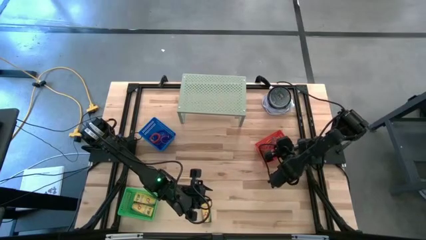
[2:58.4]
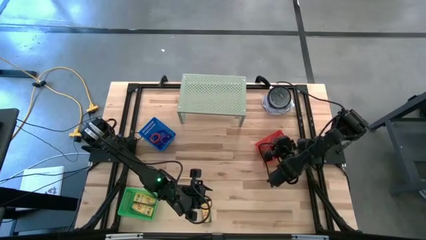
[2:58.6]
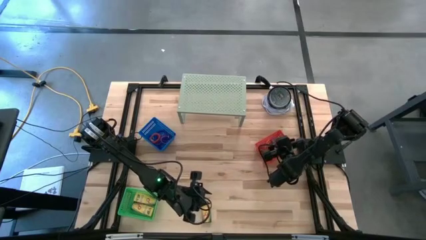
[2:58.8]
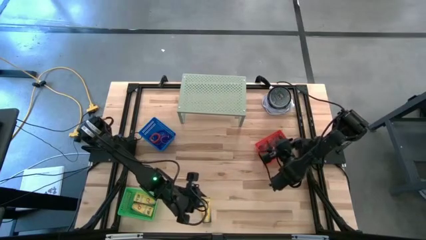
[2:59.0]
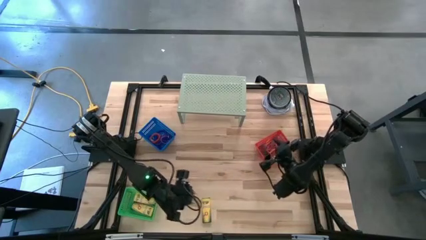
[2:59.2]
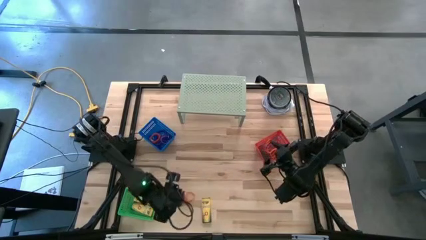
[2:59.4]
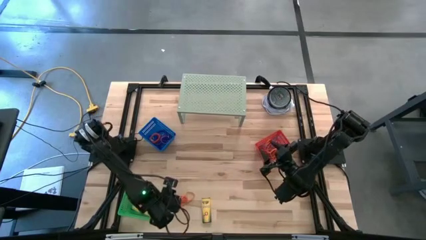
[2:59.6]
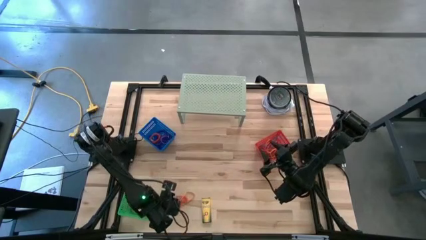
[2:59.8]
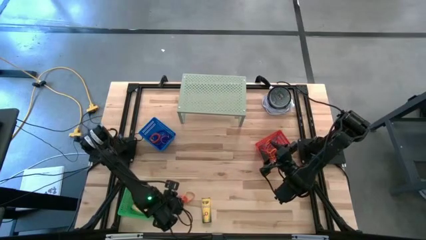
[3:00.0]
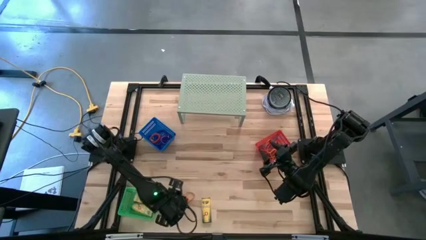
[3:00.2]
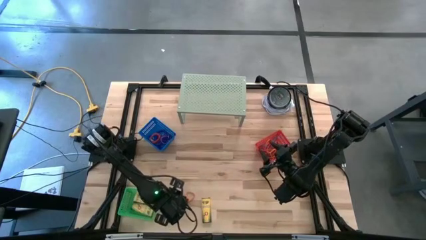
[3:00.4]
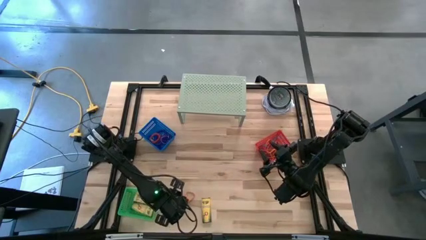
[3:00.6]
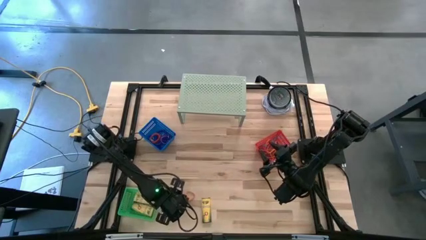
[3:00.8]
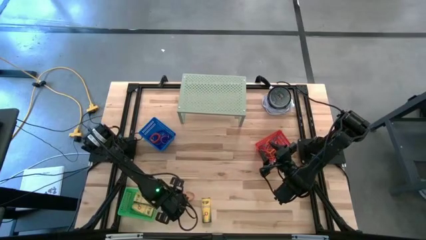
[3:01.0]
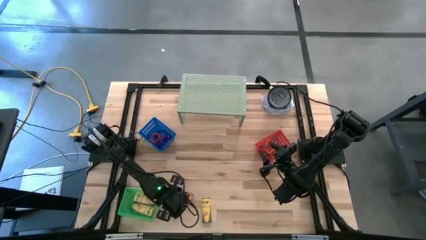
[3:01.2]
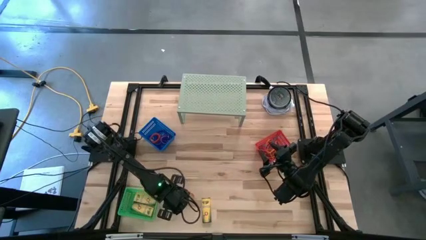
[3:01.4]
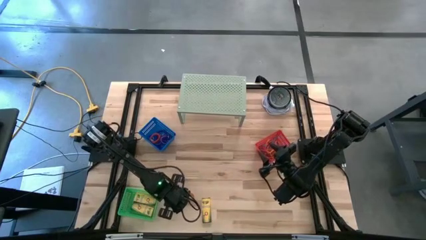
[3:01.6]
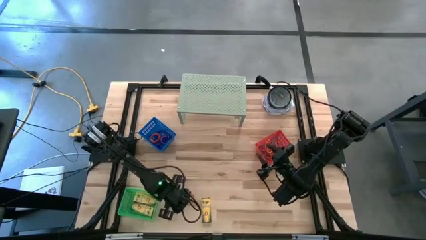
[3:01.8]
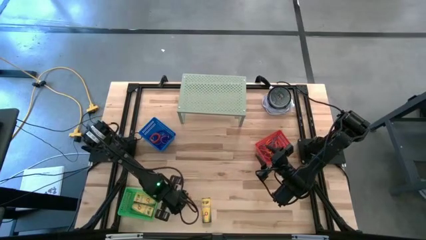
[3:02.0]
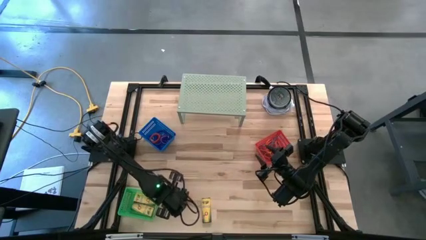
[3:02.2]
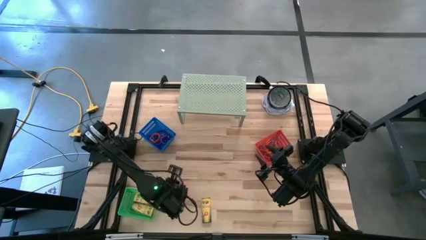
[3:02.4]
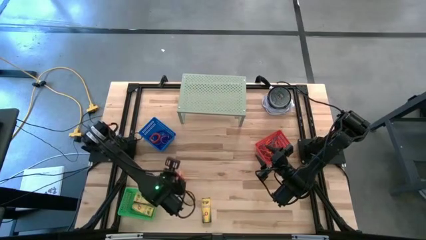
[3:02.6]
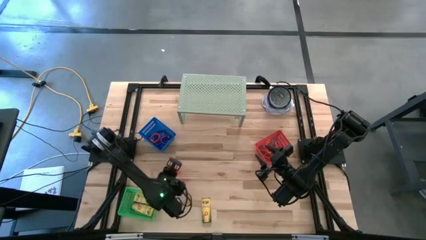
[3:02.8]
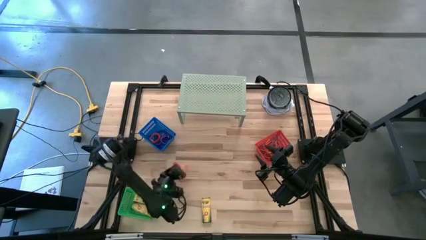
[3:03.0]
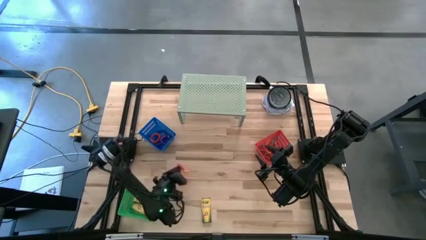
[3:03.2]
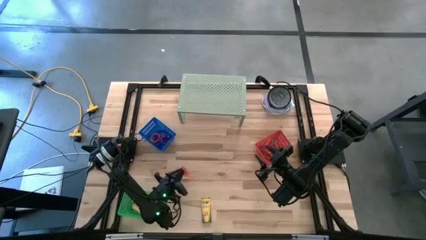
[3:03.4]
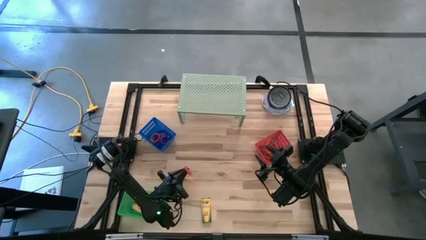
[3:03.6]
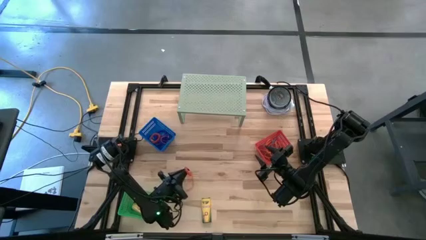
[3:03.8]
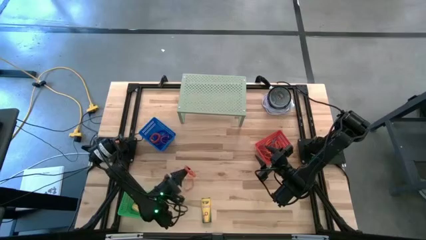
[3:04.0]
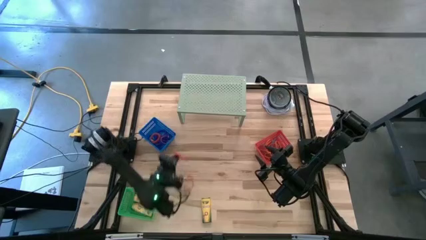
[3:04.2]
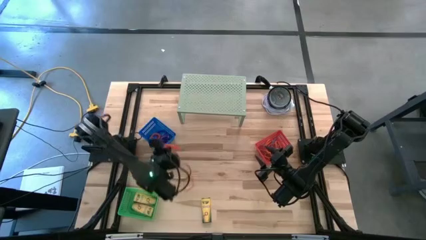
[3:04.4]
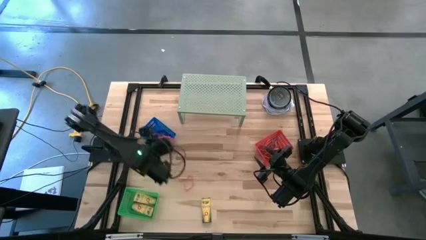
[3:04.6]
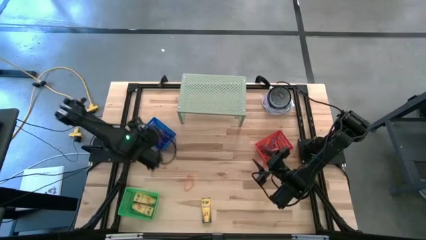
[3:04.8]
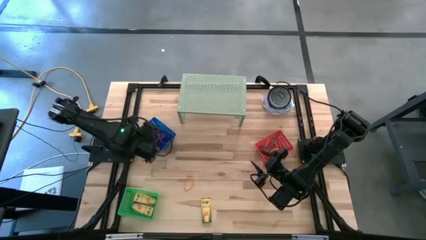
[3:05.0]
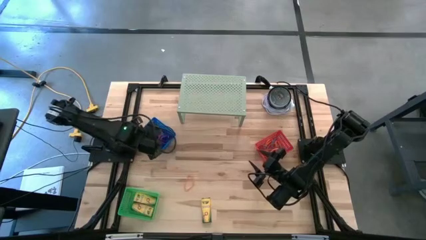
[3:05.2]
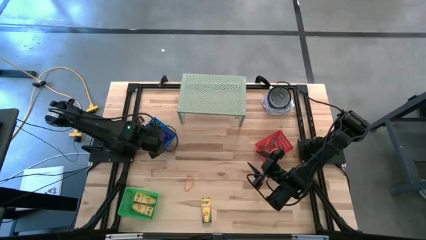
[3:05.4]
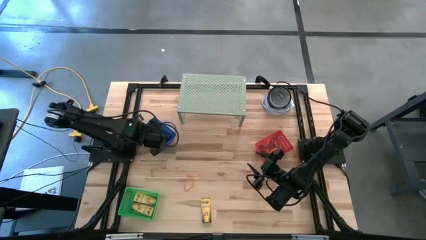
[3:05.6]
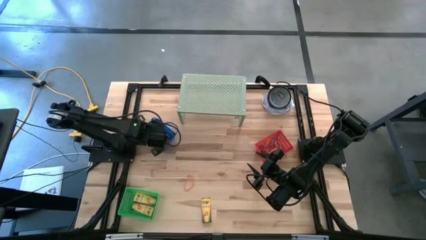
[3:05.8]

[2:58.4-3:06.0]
Task: Pick & Place Office Desk Supplies
Put the orange spring keychain into the blue bin

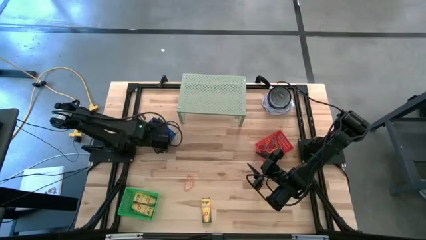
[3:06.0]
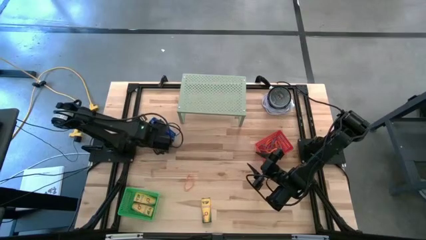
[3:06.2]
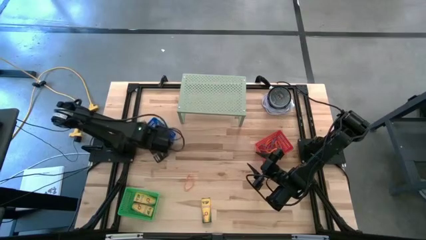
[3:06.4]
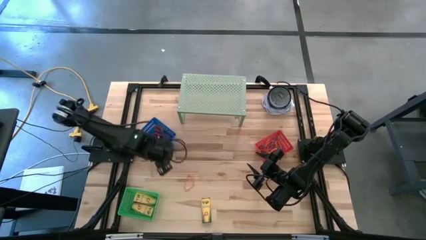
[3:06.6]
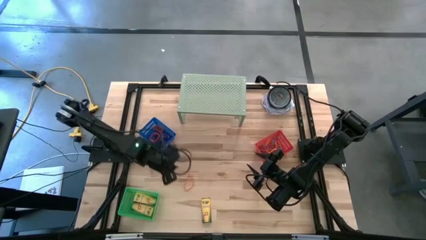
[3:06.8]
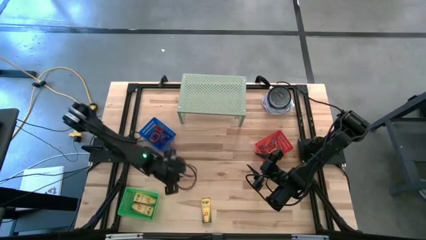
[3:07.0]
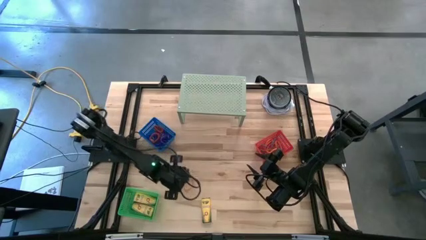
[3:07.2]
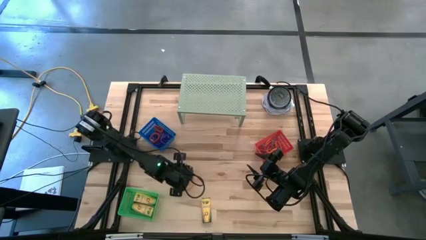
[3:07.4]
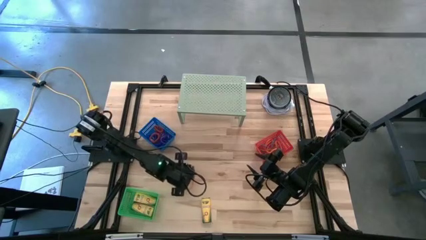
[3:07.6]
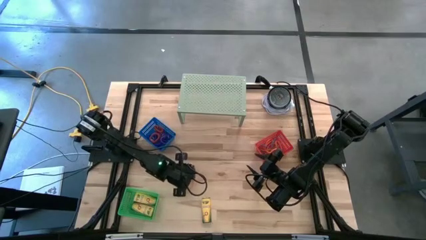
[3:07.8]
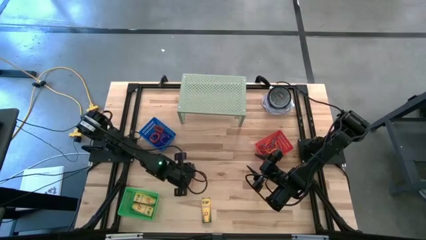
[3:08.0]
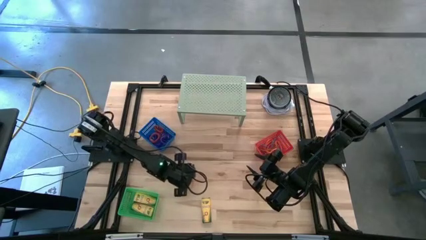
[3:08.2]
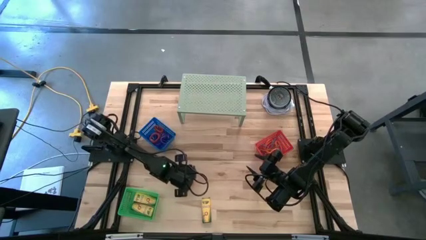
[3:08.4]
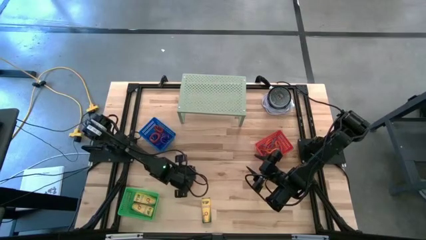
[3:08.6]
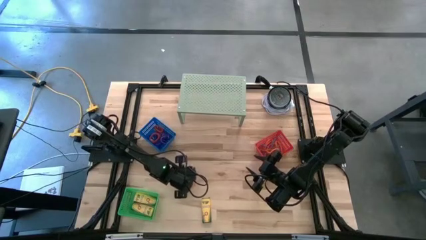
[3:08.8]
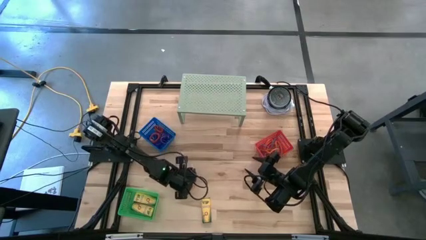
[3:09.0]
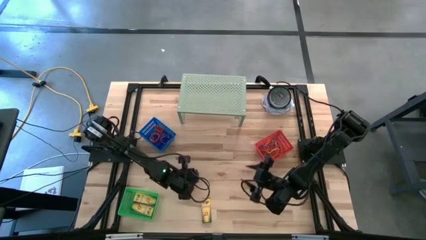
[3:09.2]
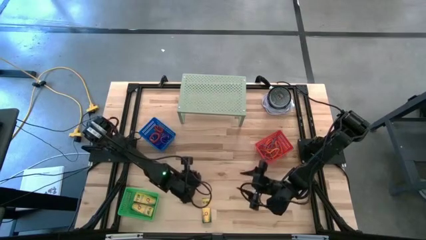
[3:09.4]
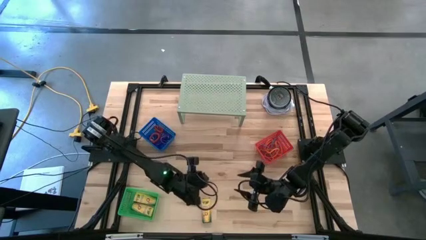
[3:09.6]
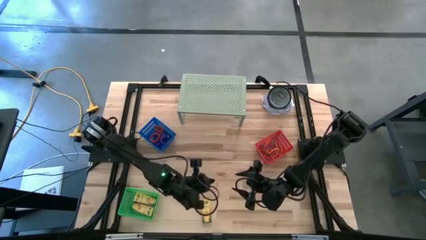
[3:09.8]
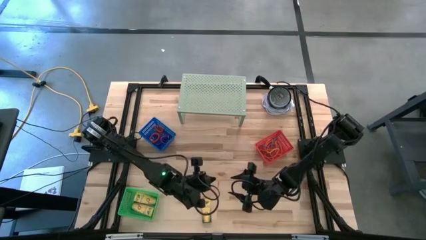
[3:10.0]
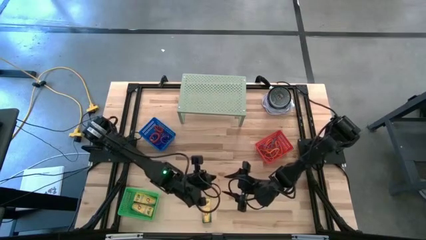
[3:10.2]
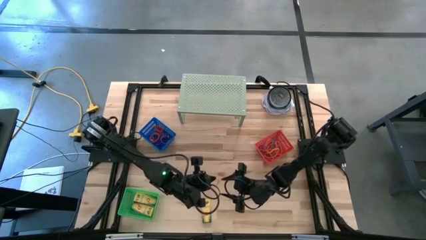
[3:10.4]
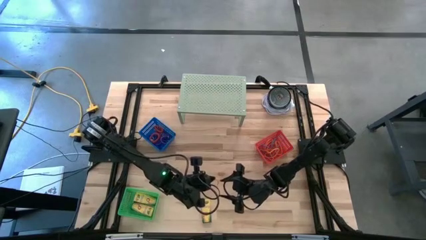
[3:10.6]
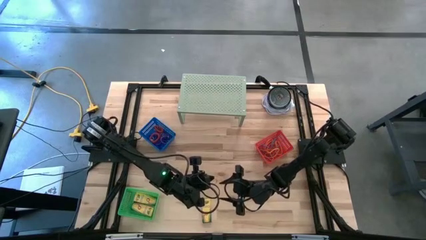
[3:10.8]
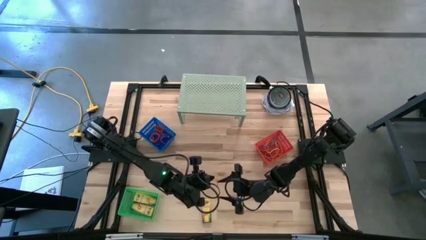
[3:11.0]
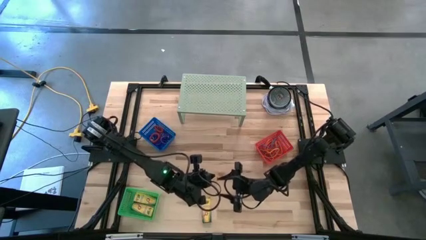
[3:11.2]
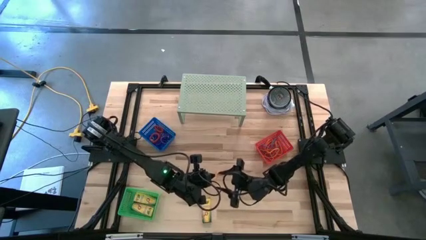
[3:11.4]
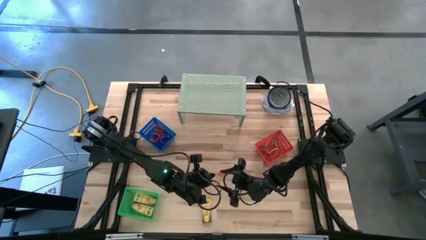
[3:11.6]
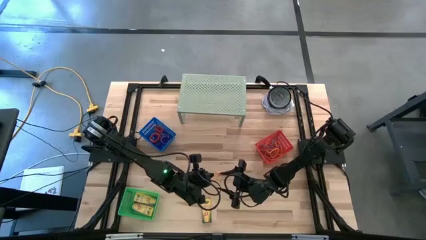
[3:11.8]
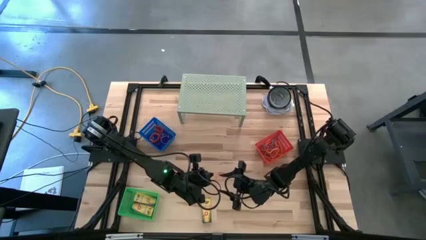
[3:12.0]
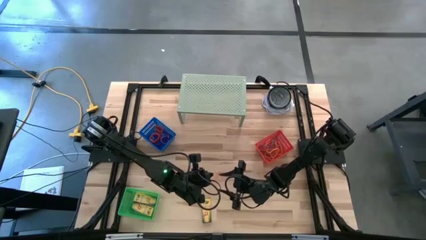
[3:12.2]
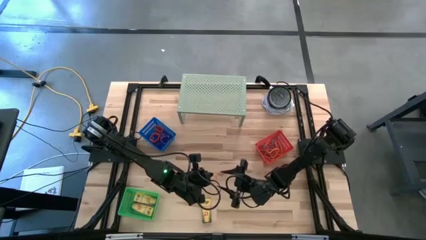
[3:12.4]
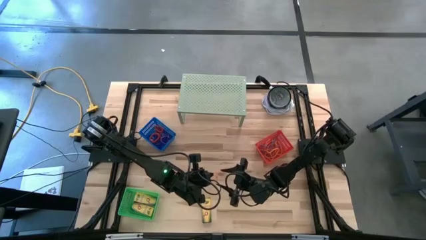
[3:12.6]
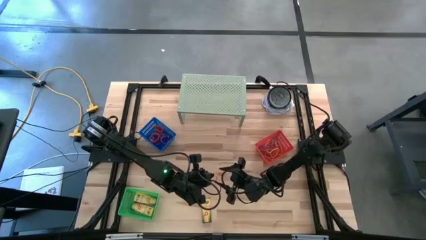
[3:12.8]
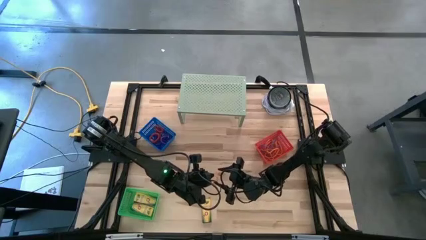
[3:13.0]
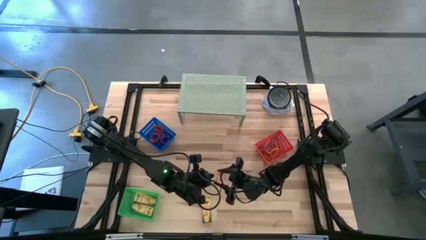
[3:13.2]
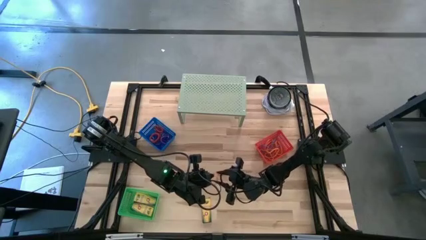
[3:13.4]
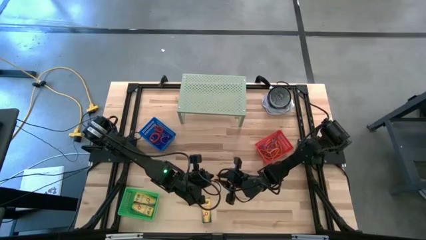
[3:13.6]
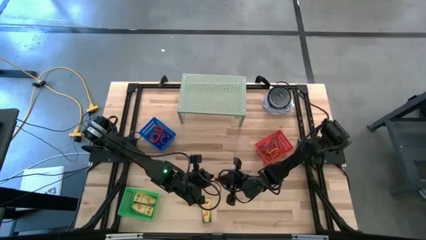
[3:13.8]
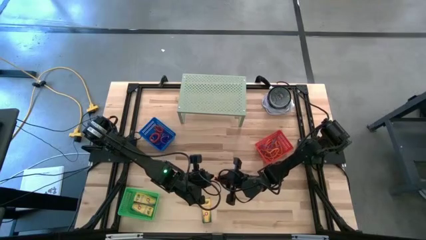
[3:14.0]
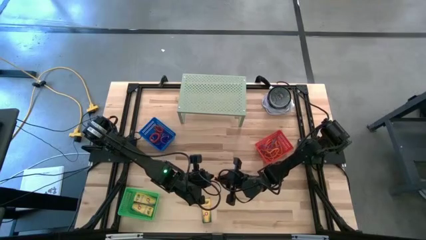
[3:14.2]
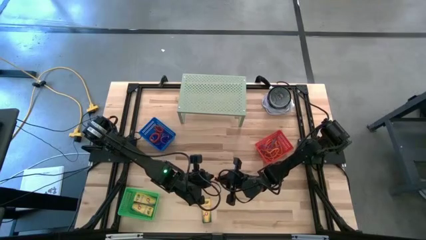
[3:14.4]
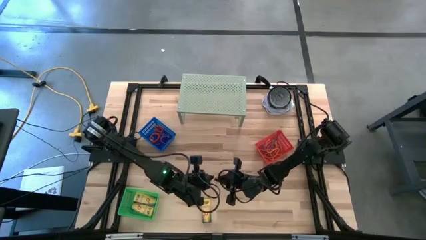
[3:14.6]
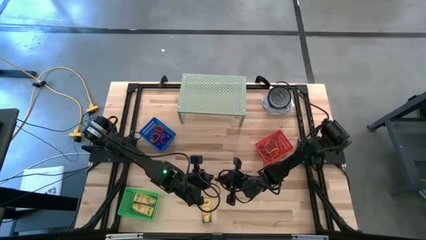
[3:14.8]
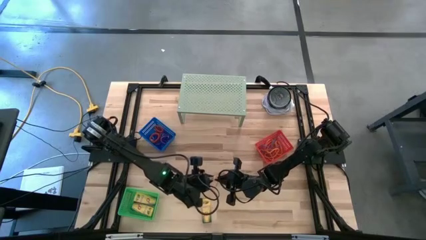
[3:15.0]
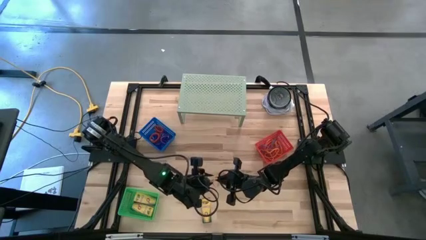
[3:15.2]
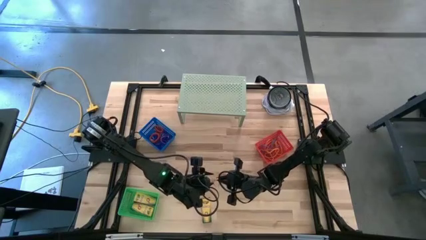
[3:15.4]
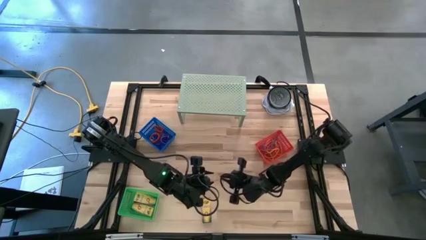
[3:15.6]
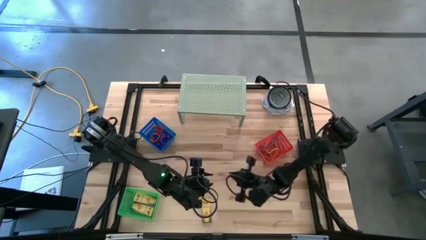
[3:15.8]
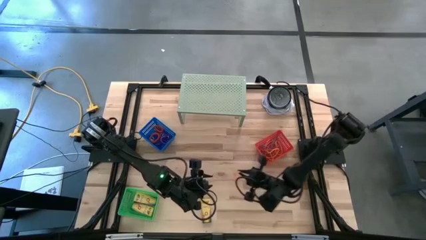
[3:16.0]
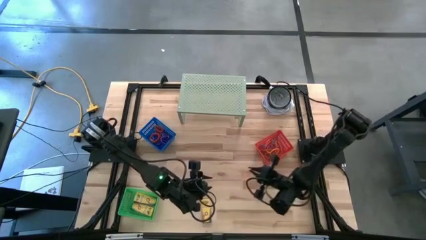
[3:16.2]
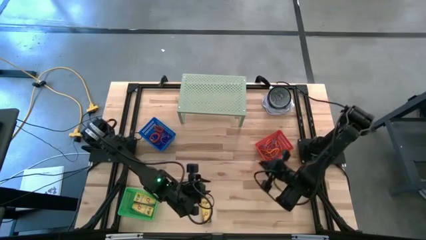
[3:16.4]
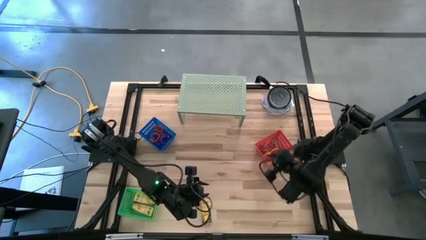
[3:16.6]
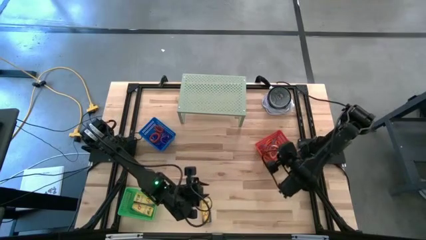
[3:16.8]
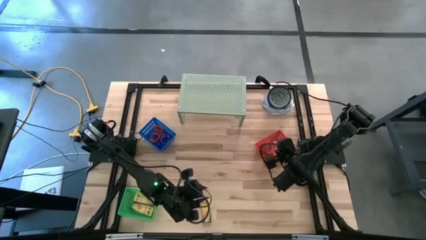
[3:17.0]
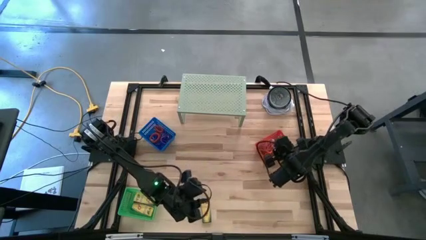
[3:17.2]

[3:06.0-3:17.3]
Put the orange rubber band into the red bin
